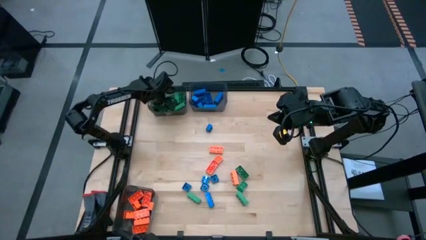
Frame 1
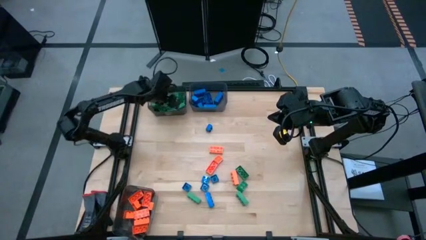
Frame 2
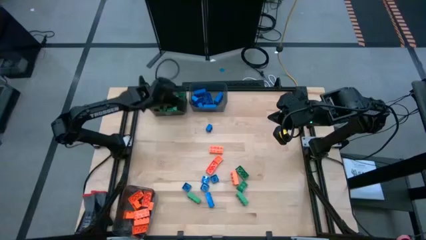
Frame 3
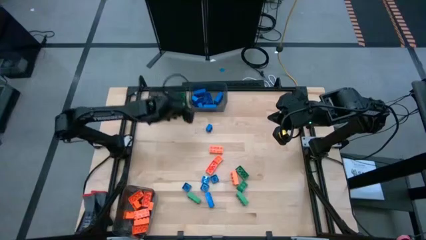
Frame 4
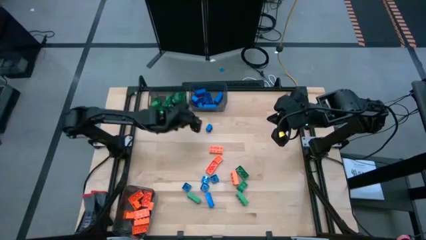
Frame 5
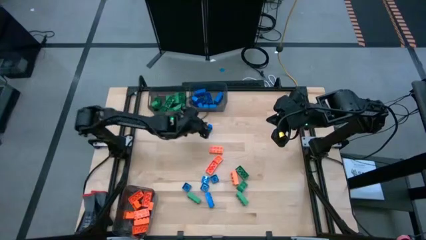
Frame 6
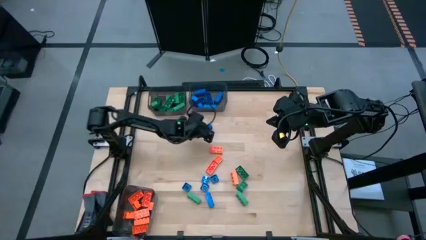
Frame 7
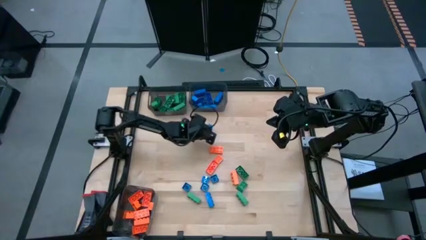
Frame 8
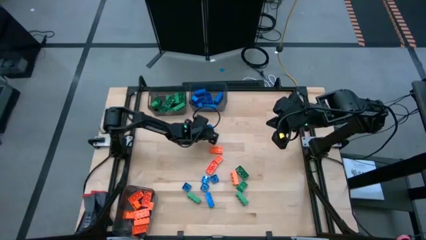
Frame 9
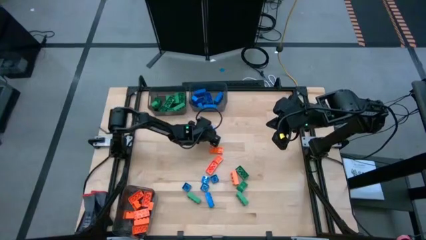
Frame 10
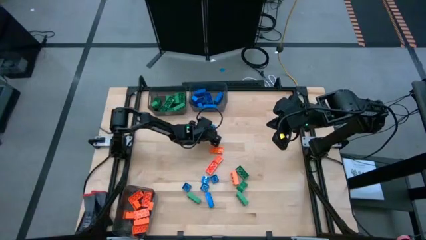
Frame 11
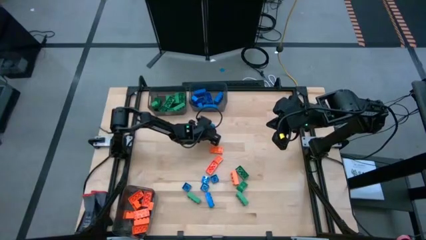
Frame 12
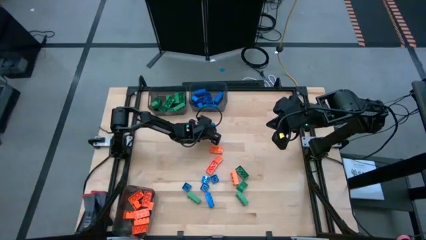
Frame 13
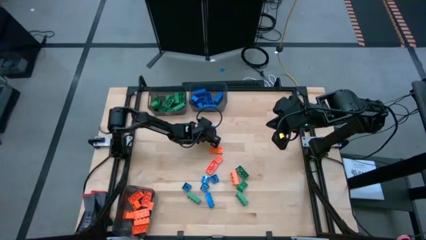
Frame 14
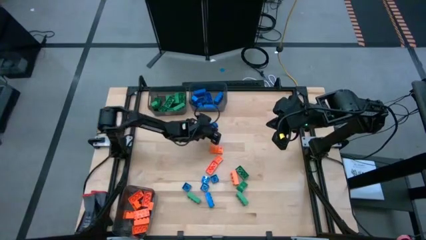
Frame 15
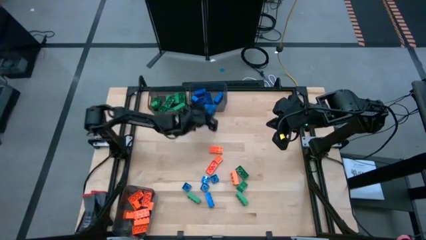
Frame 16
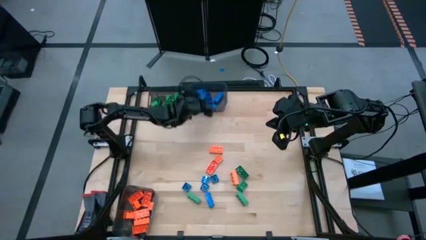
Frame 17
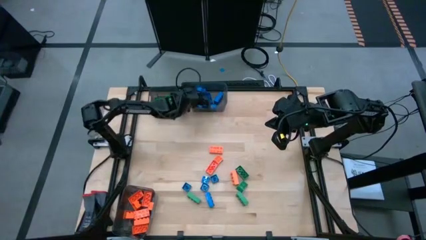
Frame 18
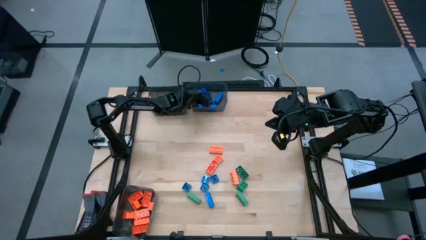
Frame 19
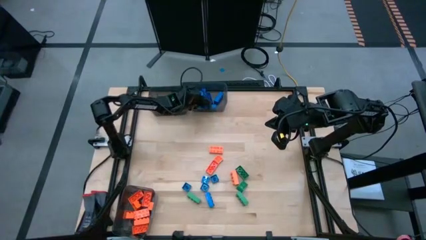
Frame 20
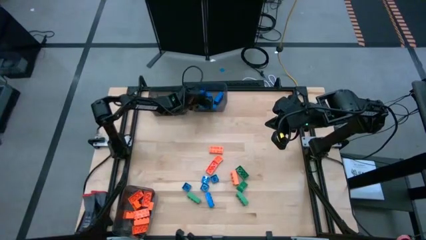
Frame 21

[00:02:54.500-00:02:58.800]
Task: Sort blocks
Put the blue gamepiece into the top right black bin

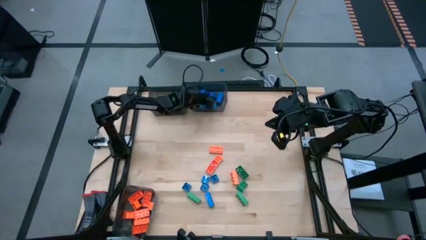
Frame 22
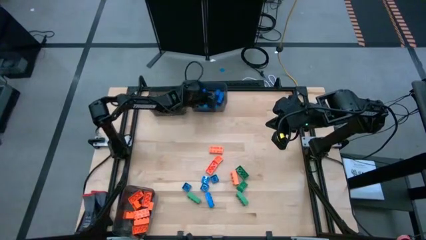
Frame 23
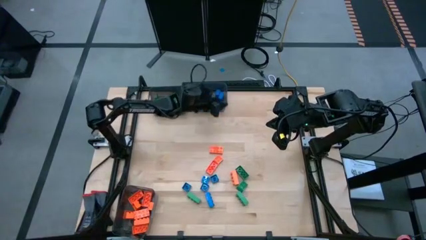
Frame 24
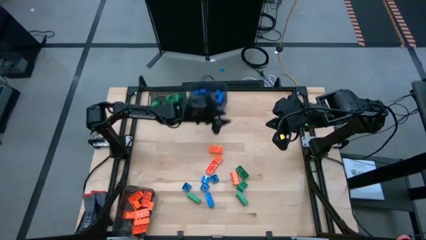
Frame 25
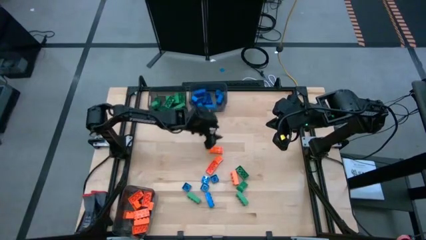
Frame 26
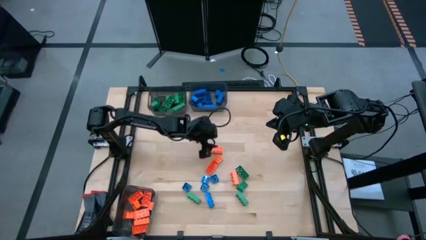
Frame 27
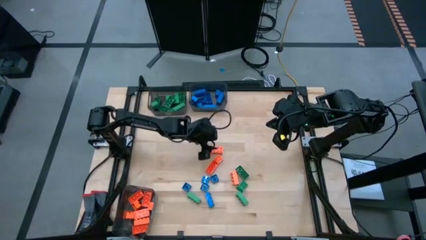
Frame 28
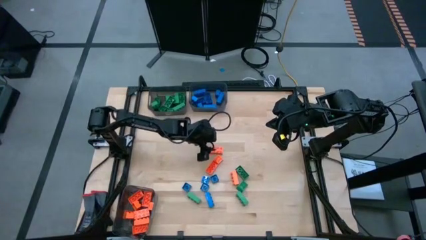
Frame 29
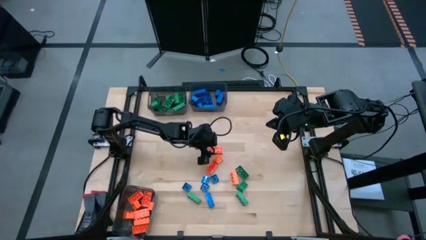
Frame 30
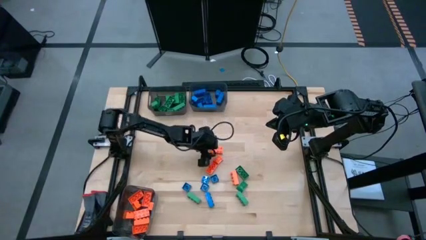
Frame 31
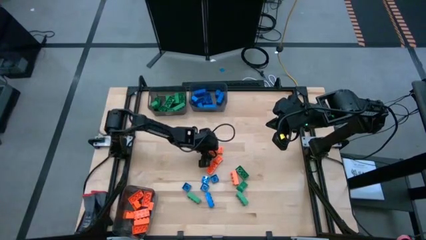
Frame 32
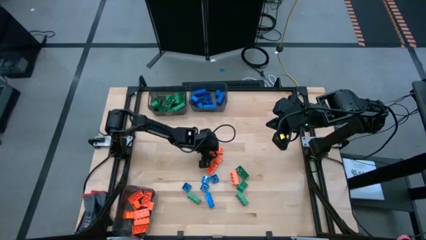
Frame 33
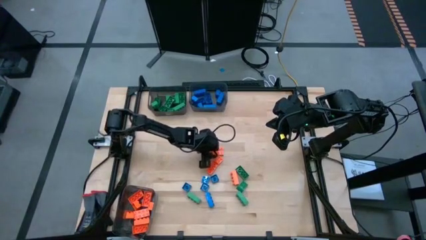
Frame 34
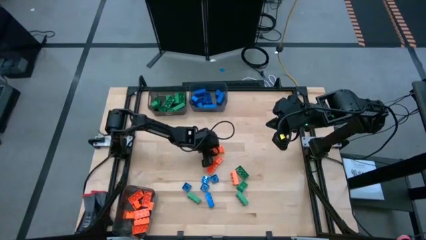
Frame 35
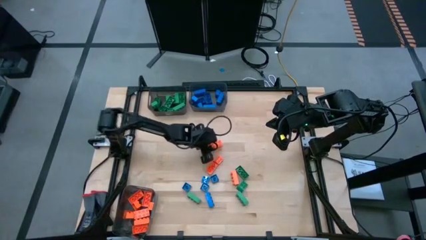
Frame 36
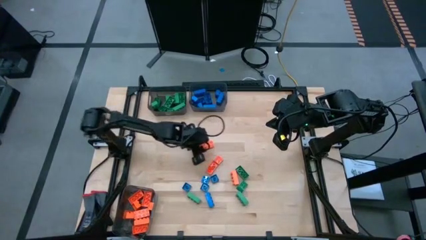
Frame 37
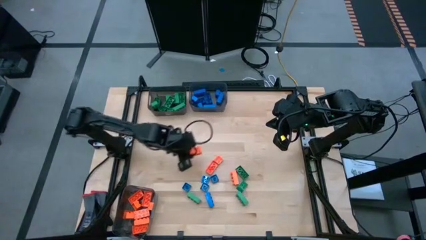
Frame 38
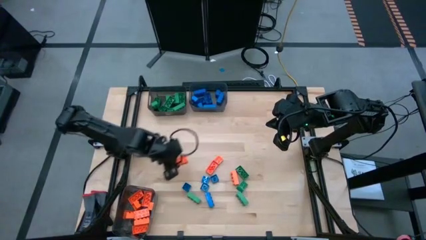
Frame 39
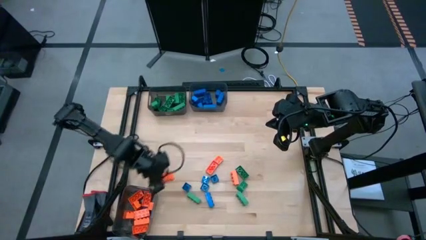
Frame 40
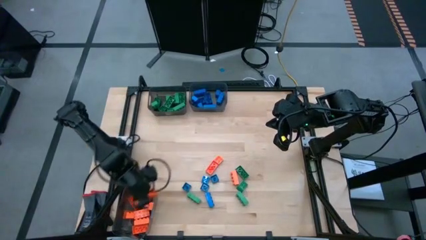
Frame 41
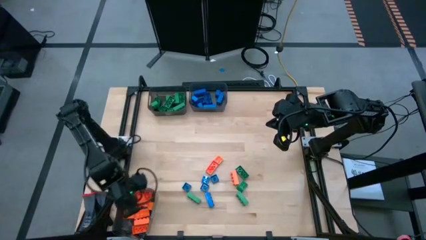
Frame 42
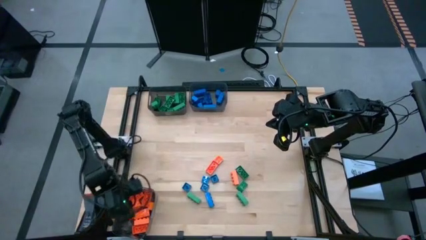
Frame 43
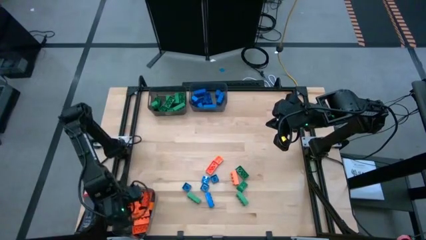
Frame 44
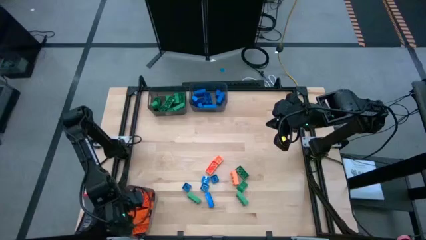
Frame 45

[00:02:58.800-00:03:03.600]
Put the orange gamepiece into the bottom black bin

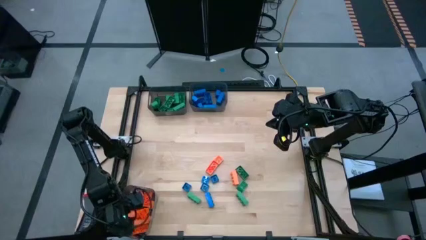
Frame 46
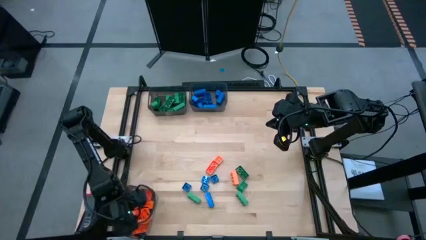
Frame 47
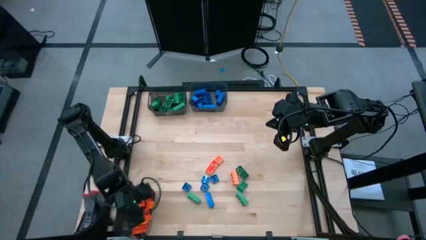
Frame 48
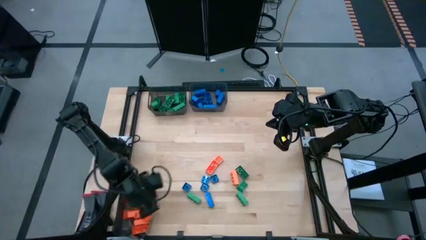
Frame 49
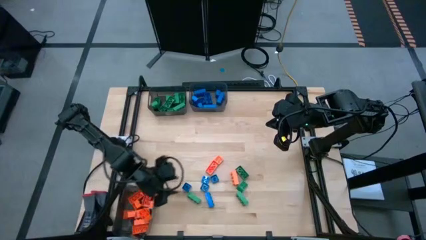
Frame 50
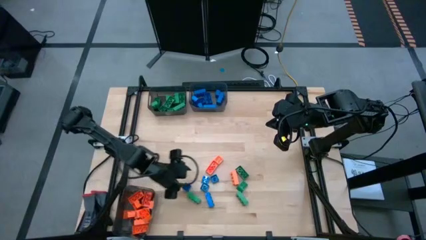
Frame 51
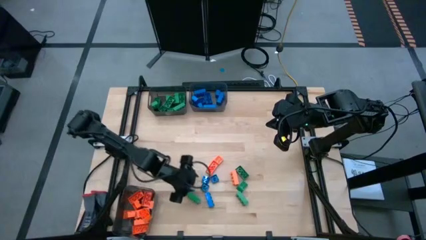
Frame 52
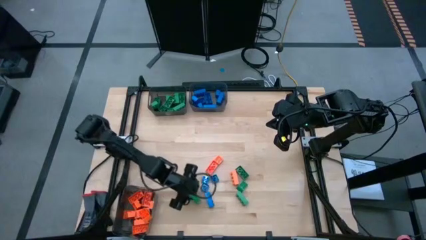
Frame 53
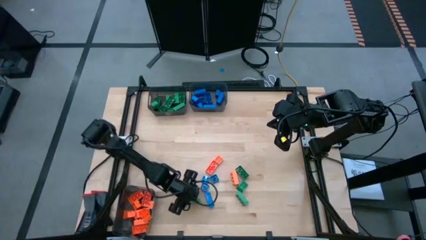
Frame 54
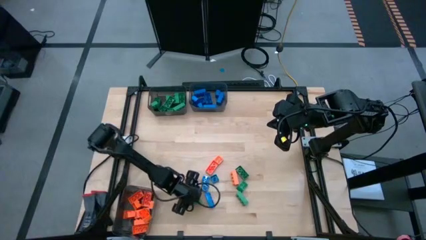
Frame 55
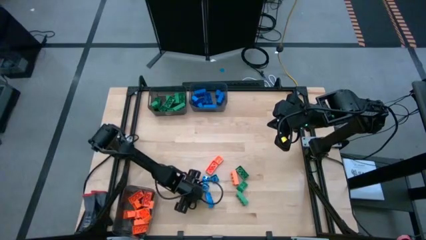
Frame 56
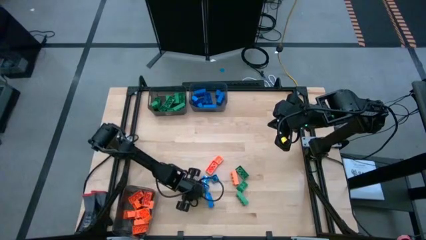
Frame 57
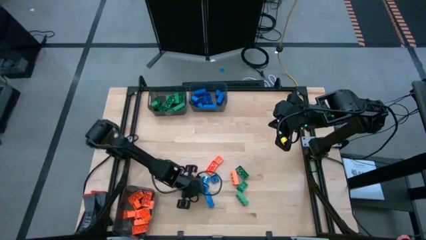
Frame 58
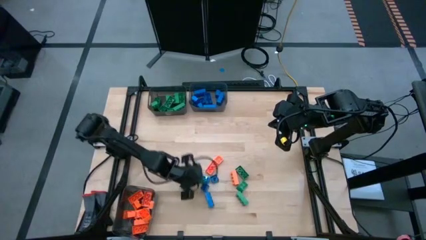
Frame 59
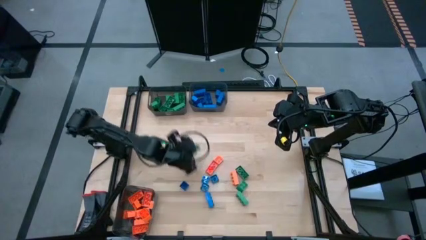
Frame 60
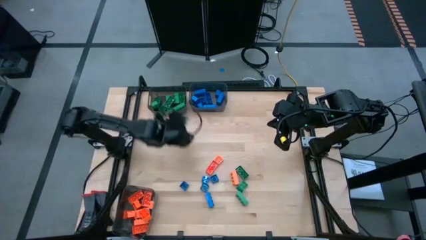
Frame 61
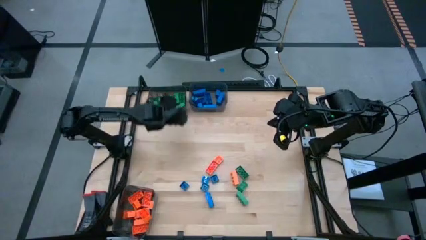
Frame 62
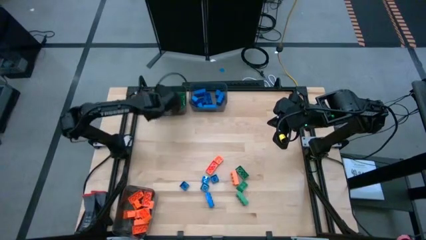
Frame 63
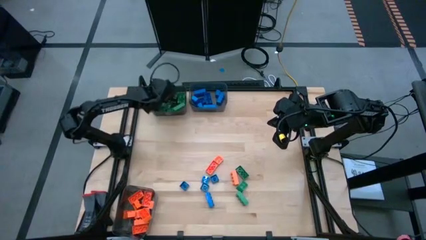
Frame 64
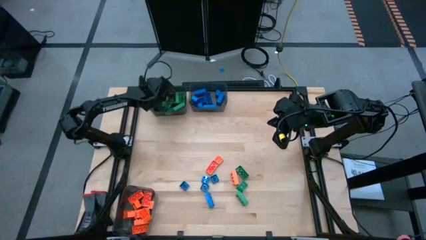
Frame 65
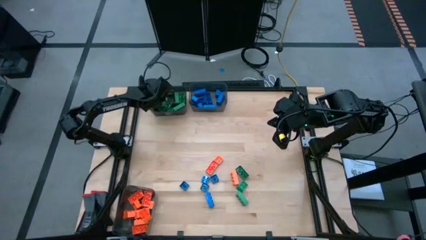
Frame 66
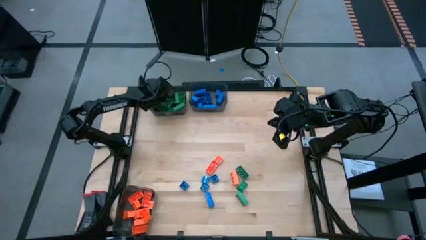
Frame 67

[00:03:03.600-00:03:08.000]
Put the green gamepiece into the top left black bin

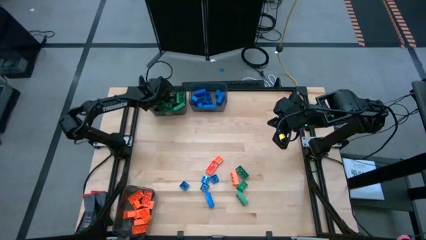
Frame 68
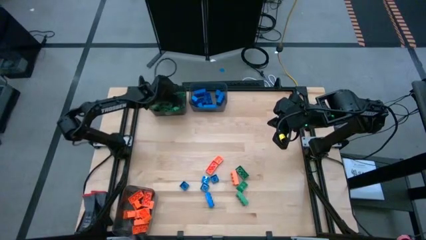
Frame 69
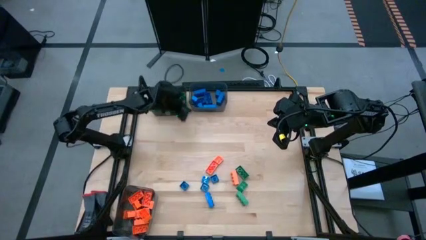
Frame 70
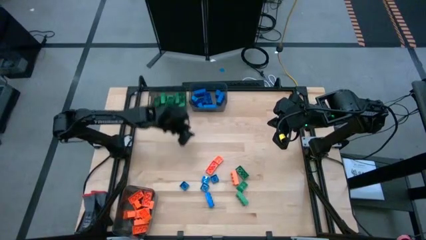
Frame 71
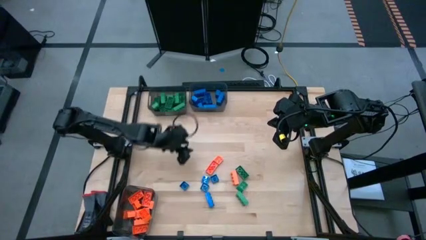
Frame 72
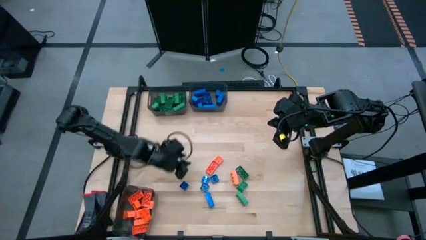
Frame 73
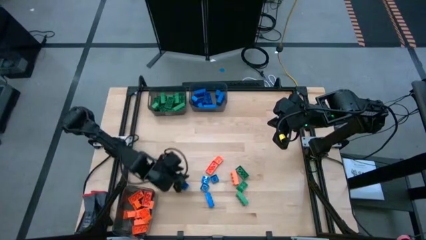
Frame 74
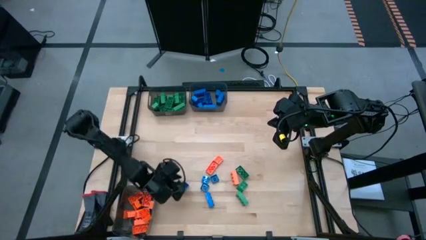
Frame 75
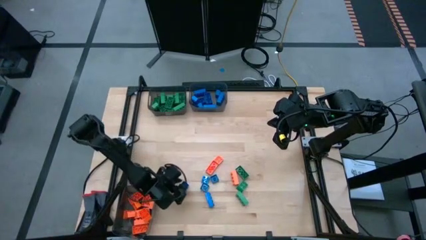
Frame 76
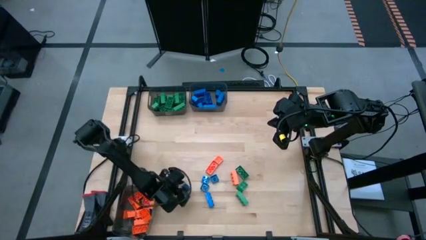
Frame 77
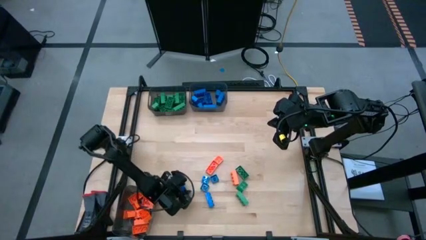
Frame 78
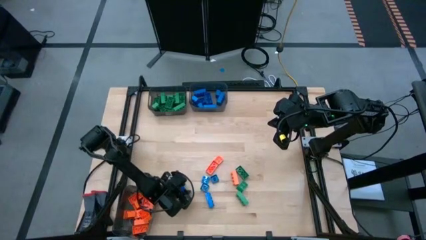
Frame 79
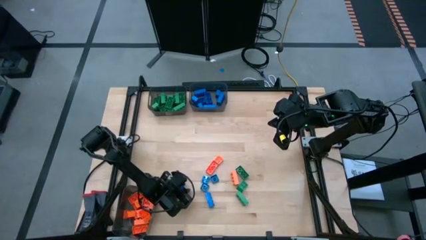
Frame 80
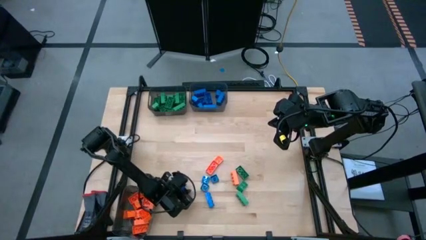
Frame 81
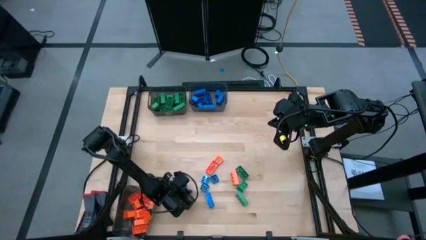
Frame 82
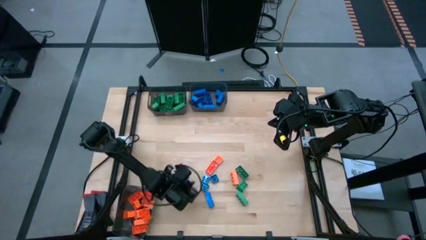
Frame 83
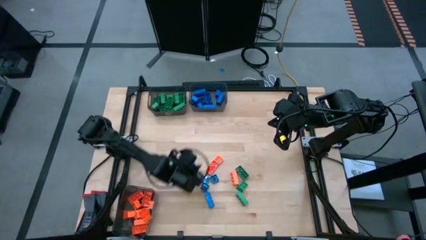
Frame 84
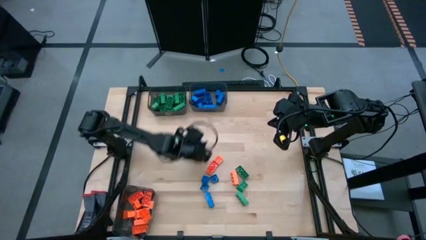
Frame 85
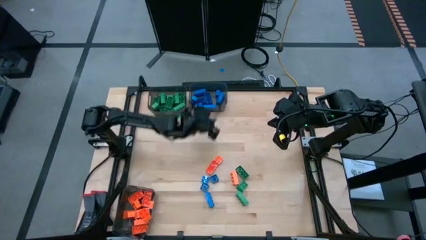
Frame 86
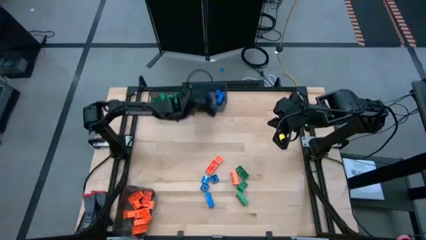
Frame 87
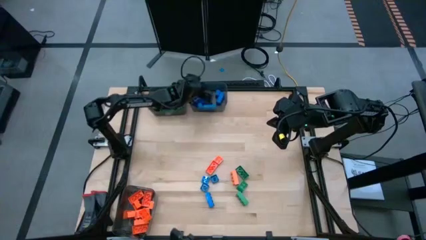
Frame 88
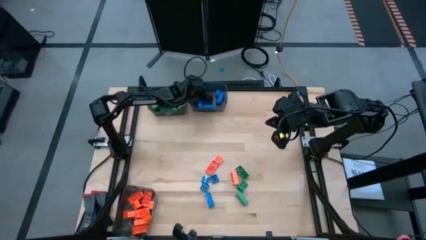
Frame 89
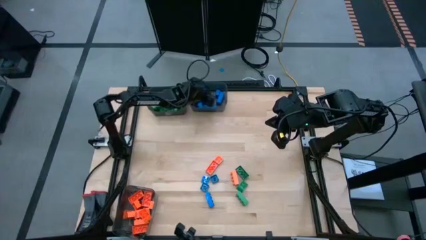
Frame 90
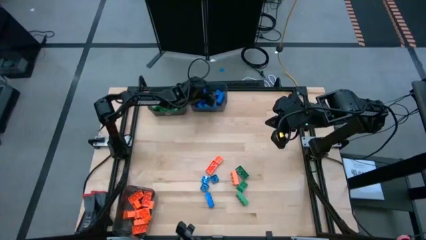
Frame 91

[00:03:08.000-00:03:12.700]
Put the blue gamepiece into the top right black bin
